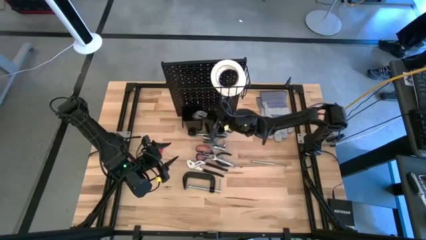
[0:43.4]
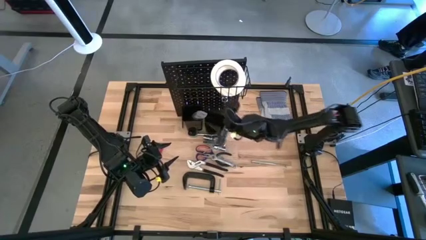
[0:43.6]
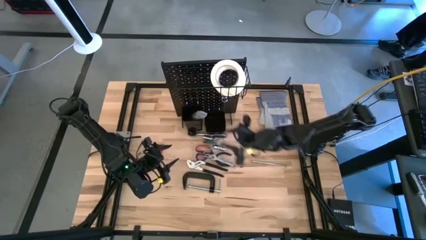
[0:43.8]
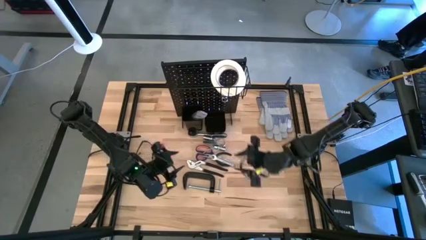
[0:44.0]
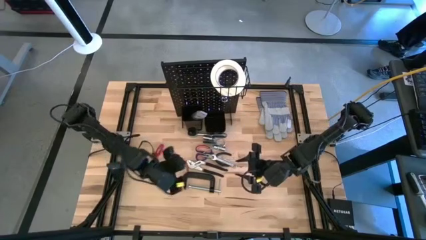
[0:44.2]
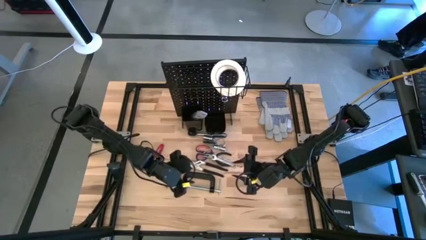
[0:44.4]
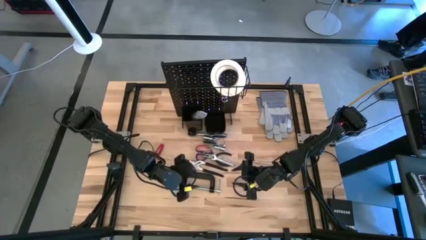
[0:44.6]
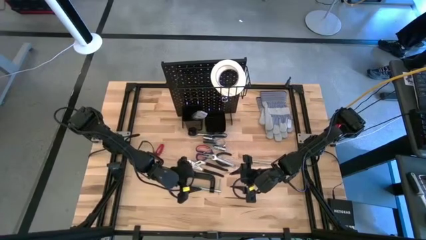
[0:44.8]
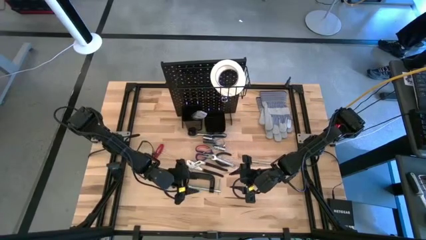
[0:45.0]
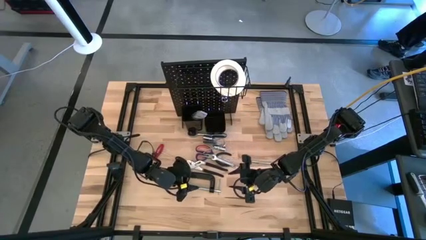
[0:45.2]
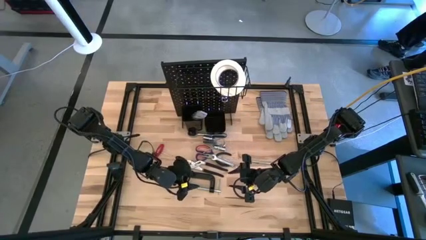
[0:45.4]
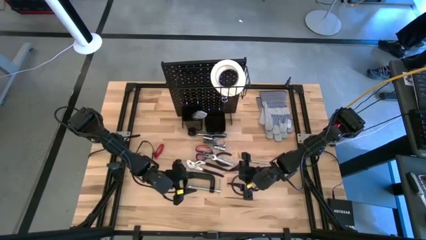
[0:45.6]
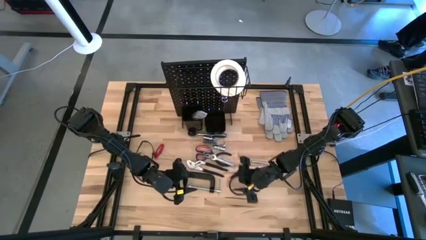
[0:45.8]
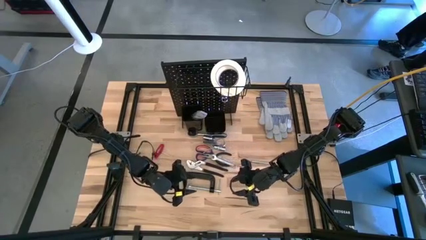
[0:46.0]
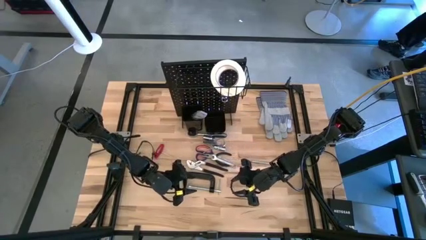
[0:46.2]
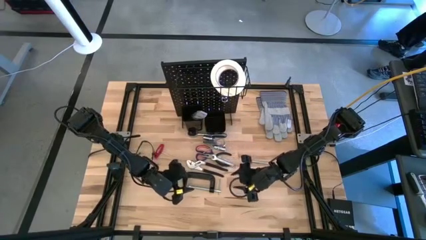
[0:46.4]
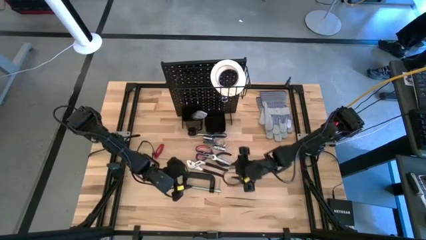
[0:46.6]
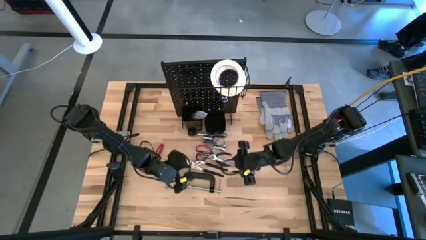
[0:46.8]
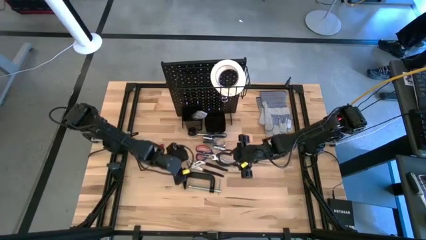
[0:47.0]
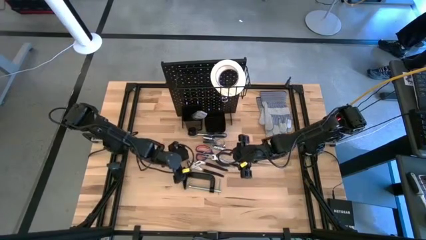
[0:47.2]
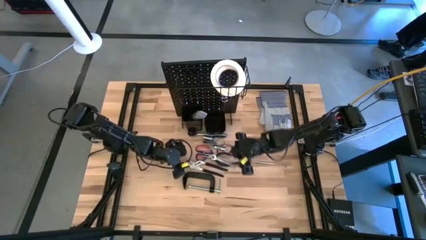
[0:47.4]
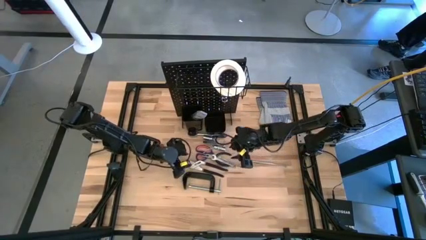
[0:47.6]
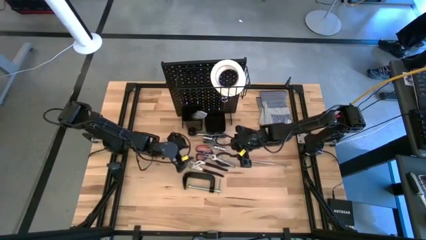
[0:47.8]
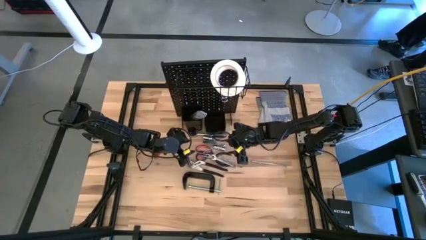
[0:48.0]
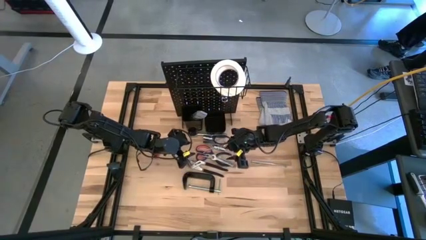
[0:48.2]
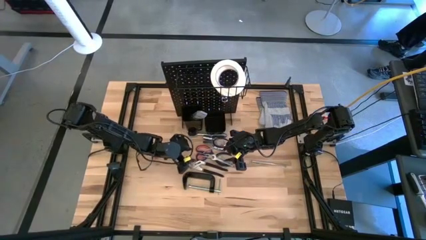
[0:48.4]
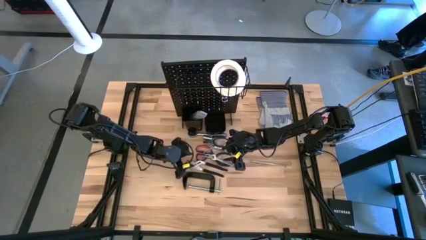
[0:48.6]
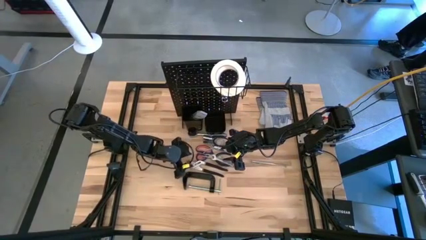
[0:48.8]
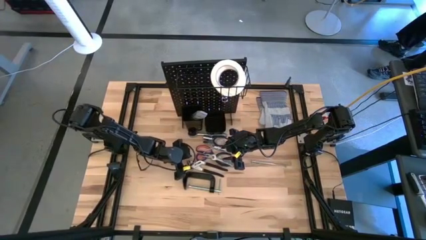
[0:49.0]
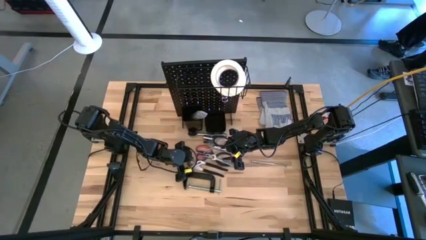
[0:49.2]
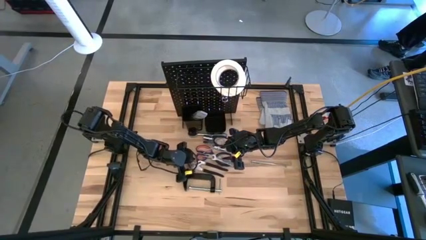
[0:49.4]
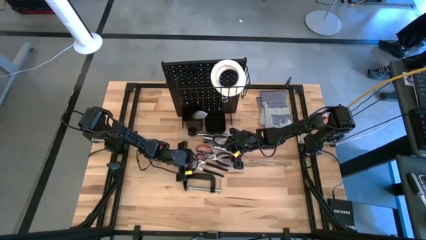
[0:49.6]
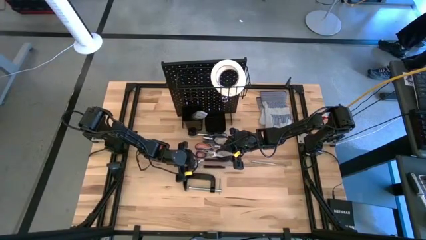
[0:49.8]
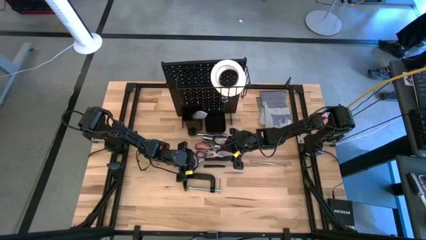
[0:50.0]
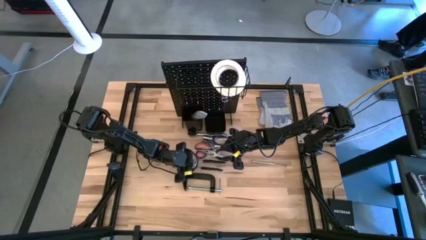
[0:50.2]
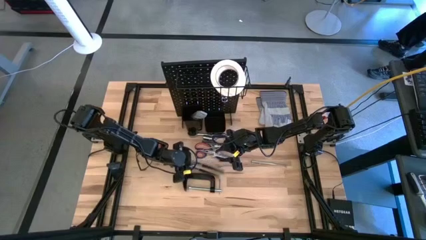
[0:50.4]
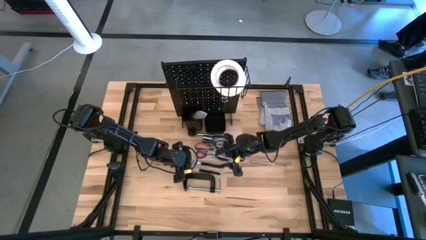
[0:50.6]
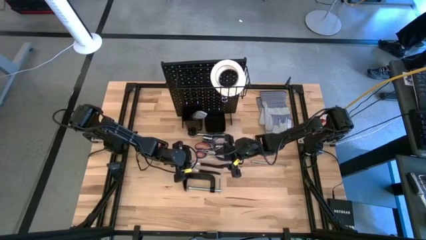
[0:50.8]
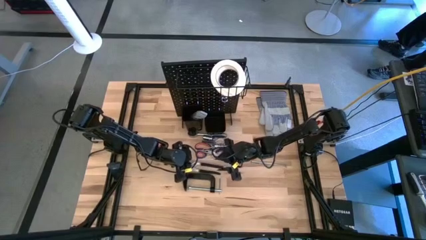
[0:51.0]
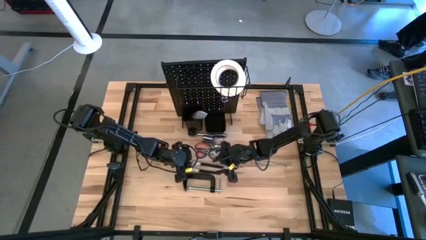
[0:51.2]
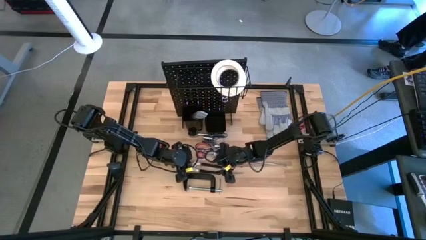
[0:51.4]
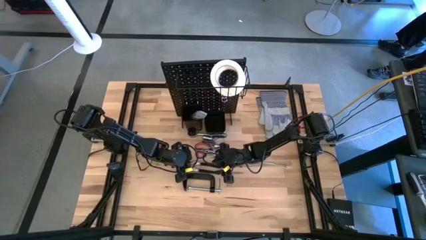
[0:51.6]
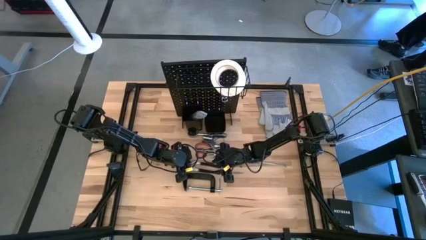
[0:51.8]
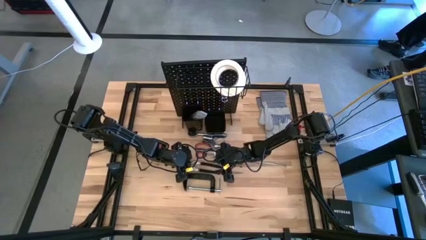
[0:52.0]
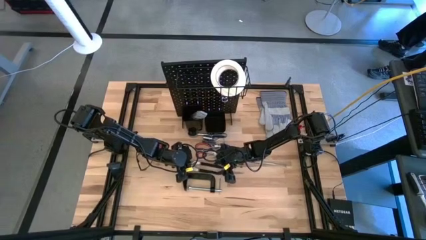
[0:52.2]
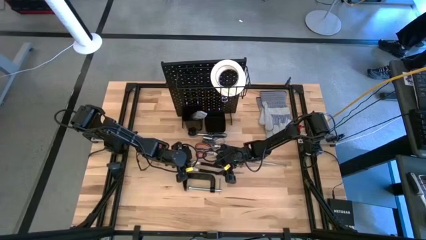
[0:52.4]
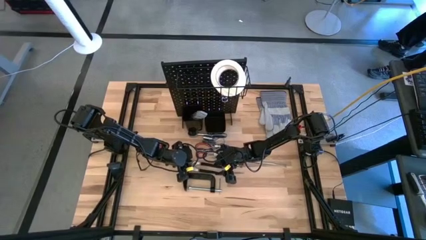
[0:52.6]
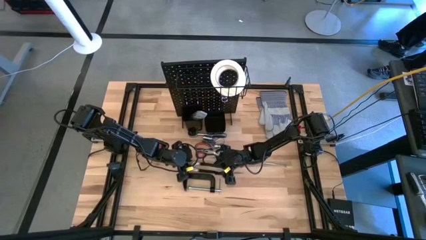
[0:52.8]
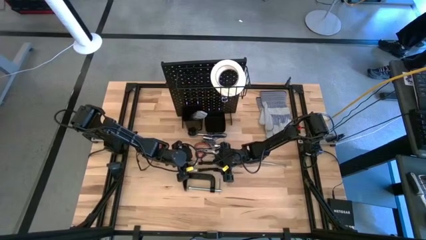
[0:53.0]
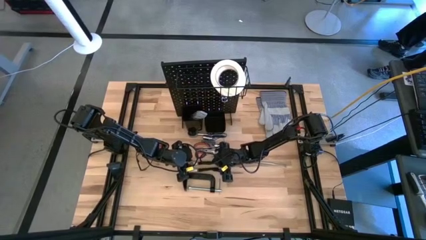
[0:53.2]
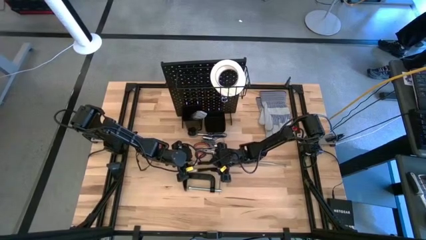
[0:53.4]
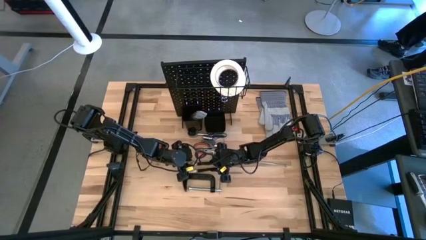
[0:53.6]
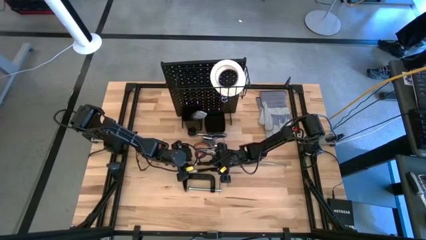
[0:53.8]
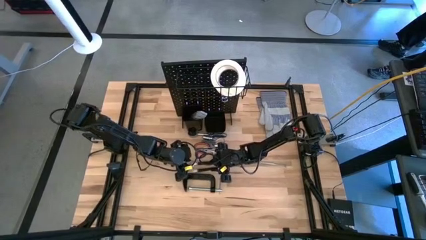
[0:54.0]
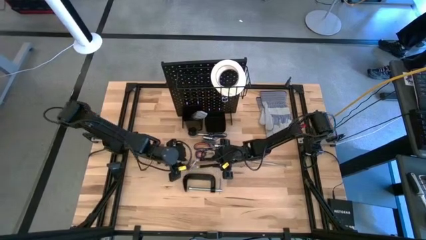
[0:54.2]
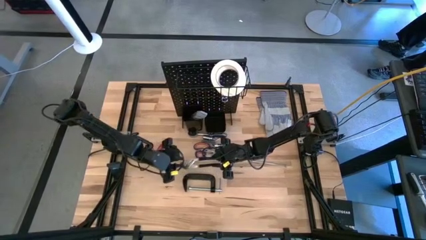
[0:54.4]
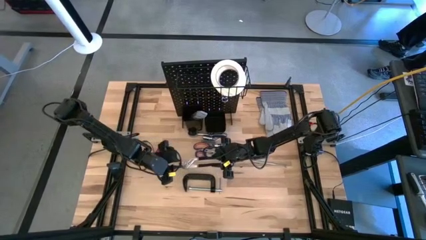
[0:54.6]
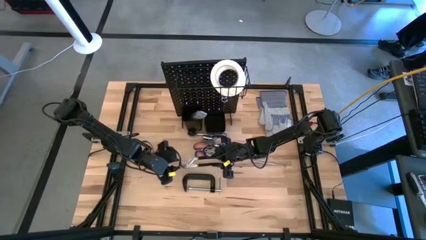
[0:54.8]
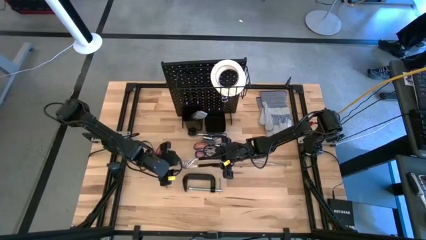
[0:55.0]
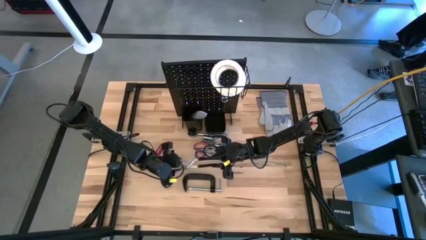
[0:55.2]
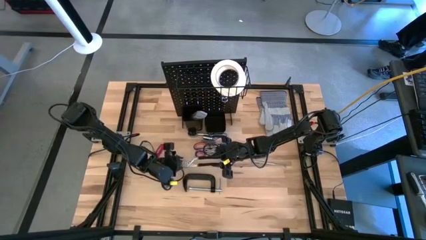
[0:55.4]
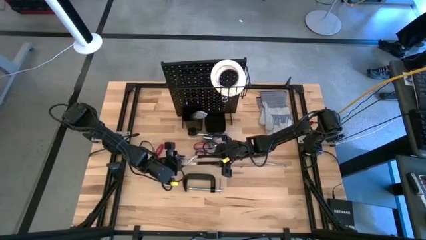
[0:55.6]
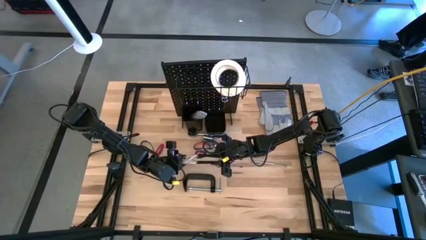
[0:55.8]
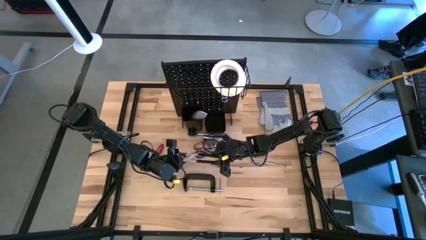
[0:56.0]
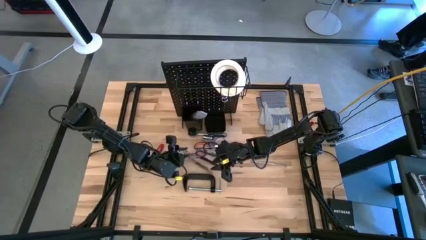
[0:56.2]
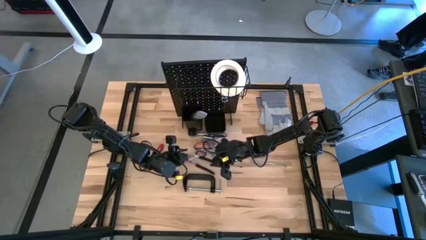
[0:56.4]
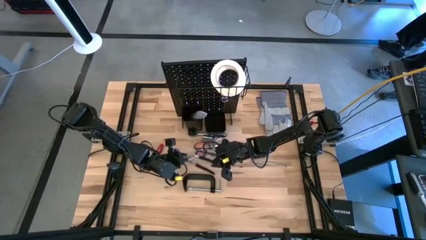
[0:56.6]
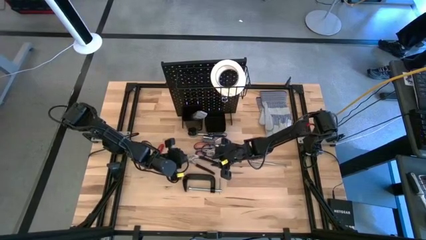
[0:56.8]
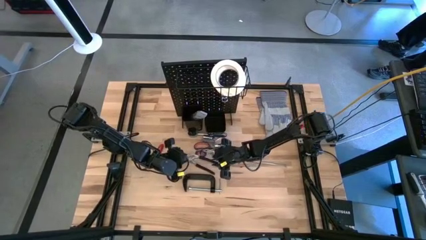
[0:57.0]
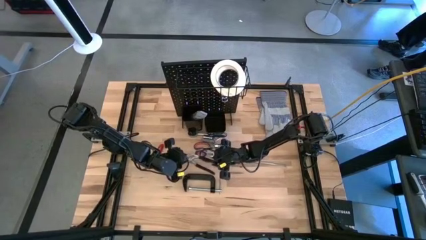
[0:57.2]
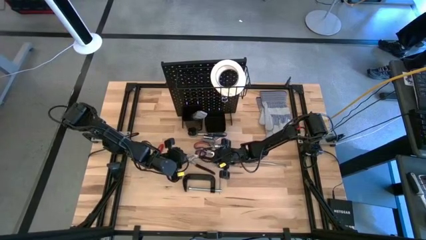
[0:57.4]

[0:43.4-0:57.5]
Task: Hang tools onto peg board
Put the joint pliers into the left bin on the pegboard
